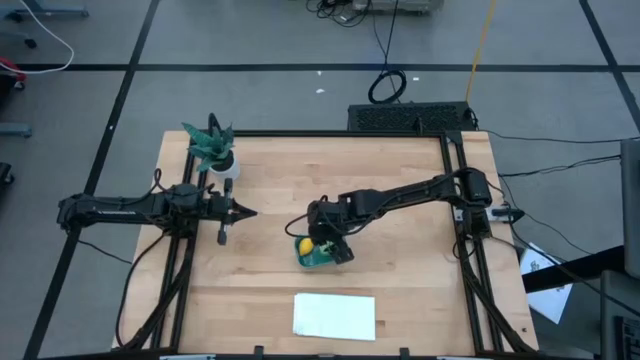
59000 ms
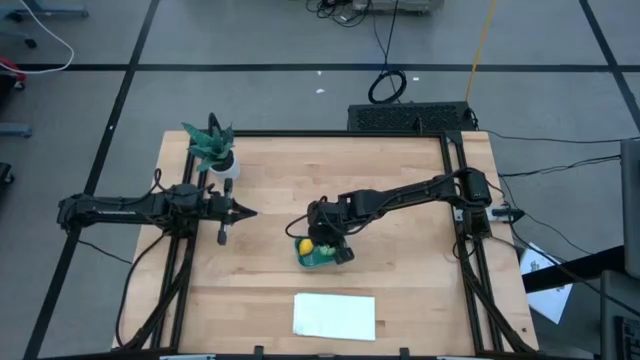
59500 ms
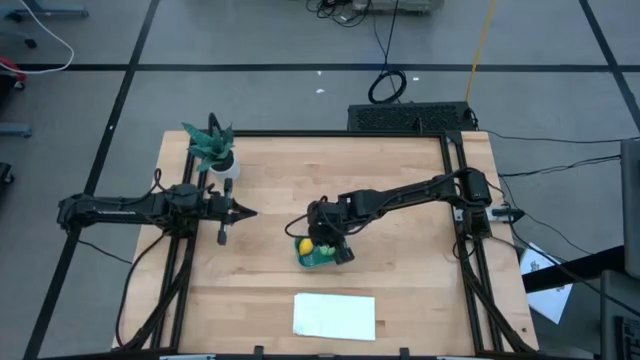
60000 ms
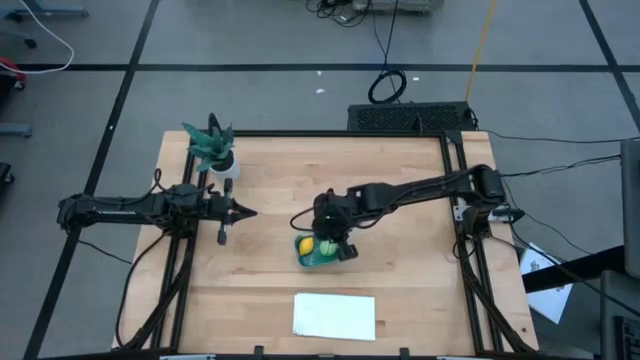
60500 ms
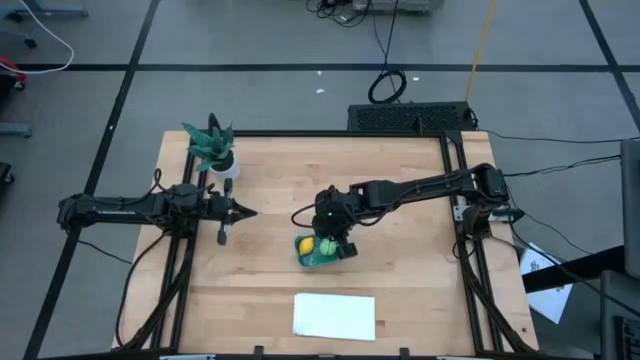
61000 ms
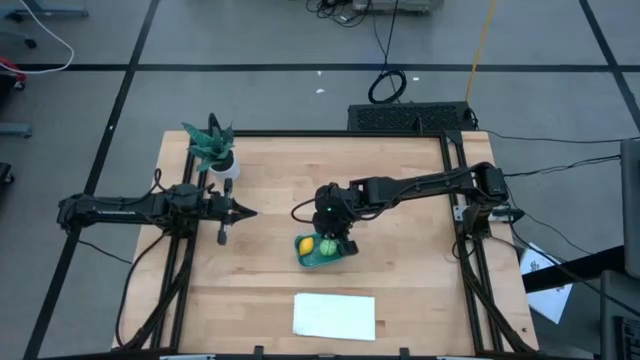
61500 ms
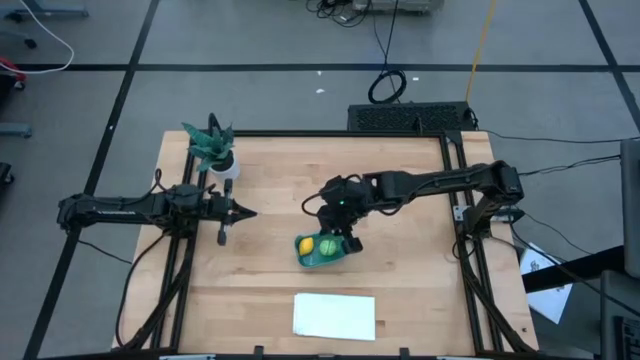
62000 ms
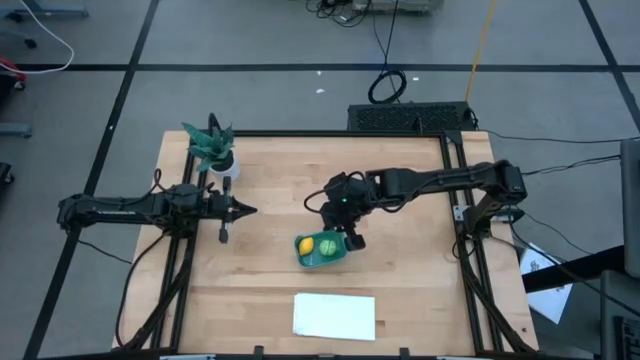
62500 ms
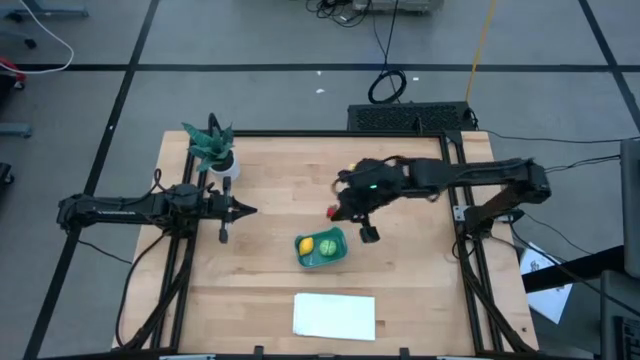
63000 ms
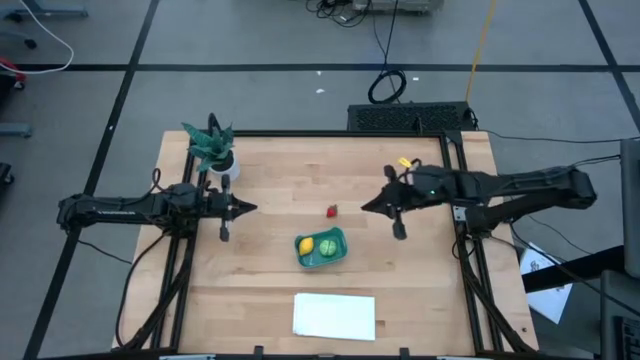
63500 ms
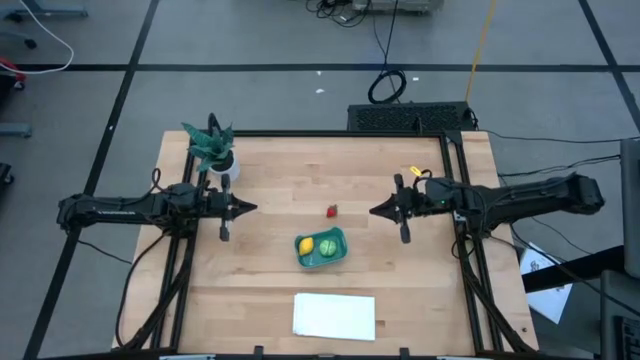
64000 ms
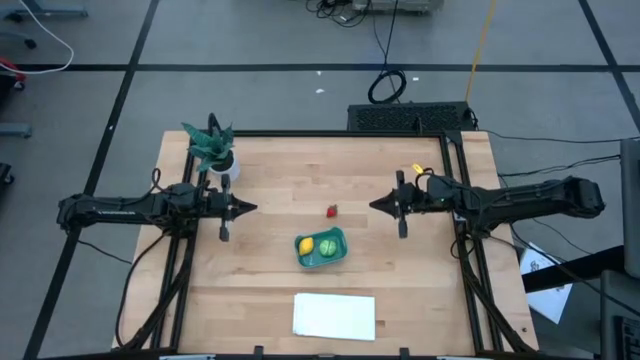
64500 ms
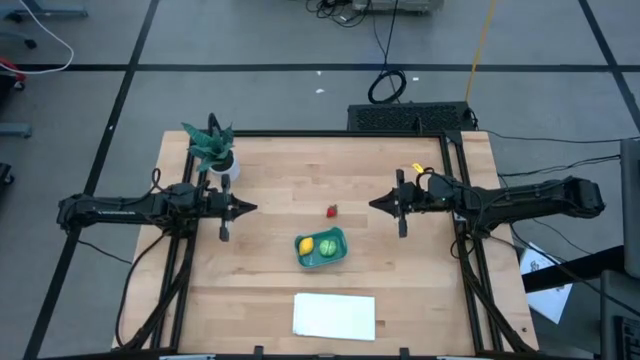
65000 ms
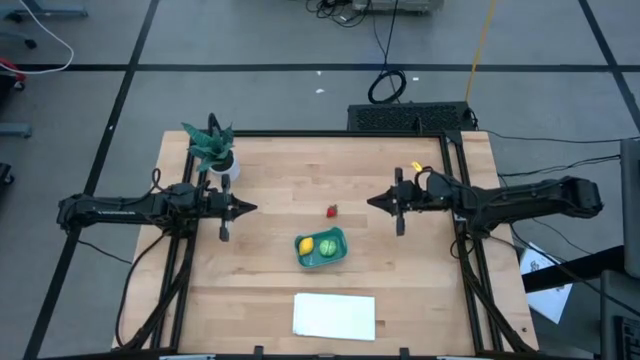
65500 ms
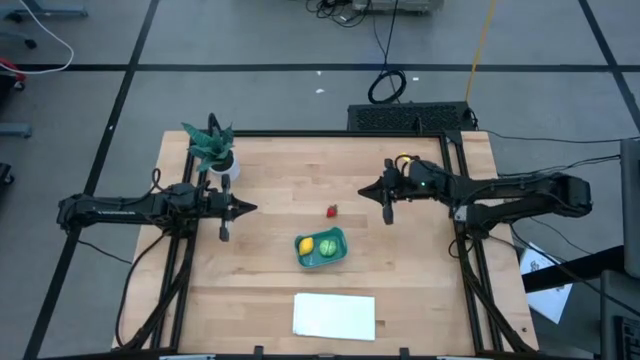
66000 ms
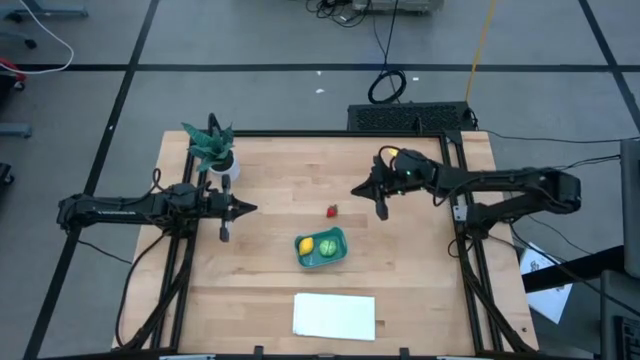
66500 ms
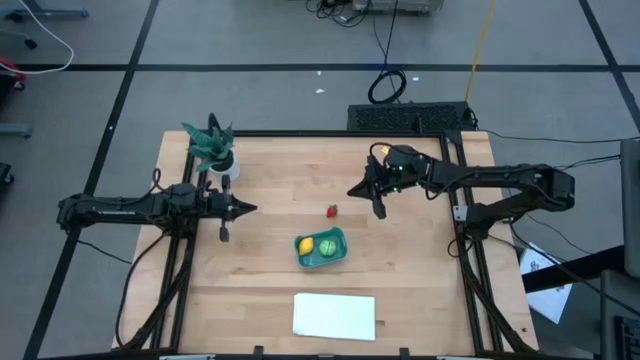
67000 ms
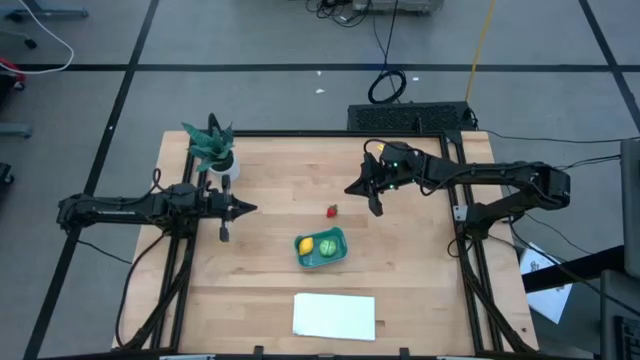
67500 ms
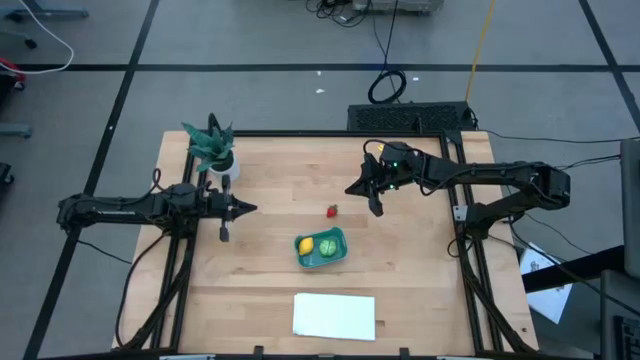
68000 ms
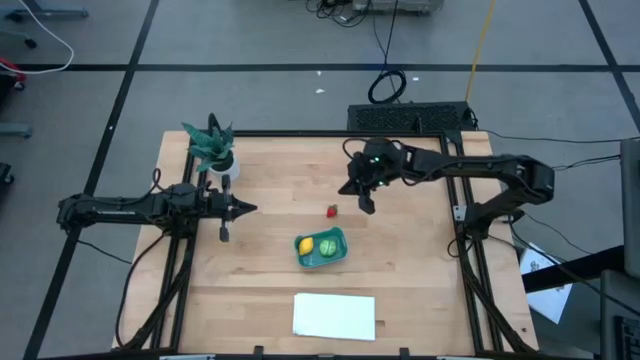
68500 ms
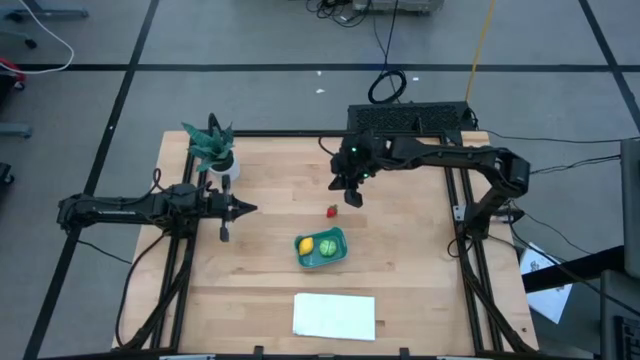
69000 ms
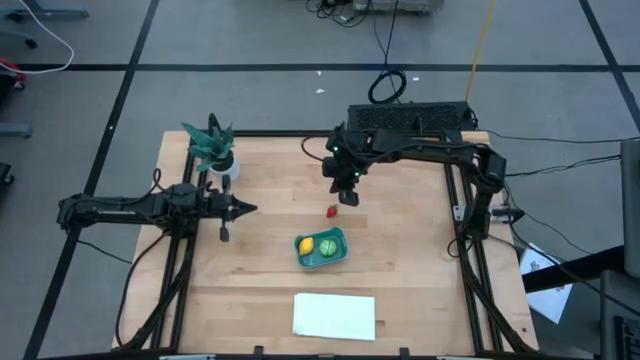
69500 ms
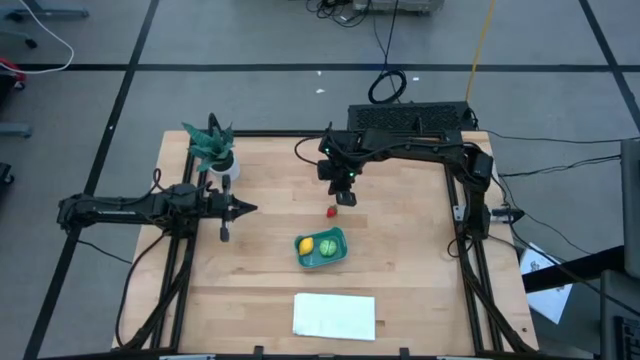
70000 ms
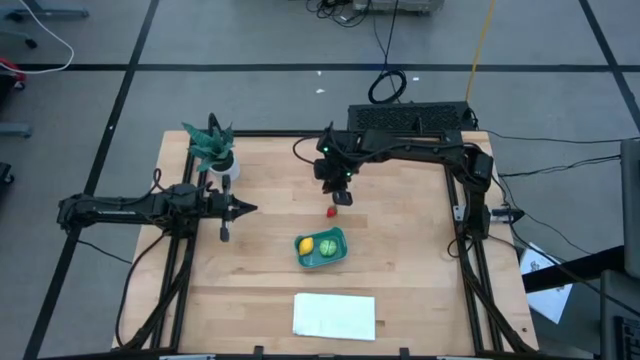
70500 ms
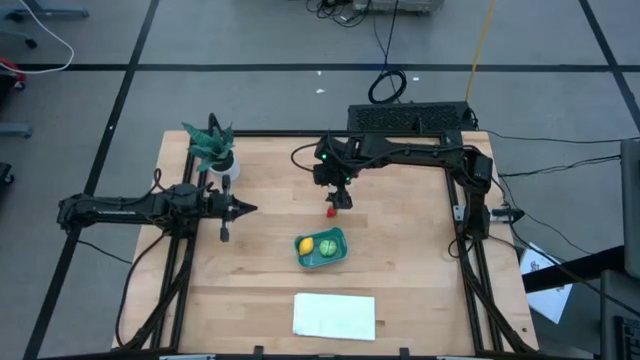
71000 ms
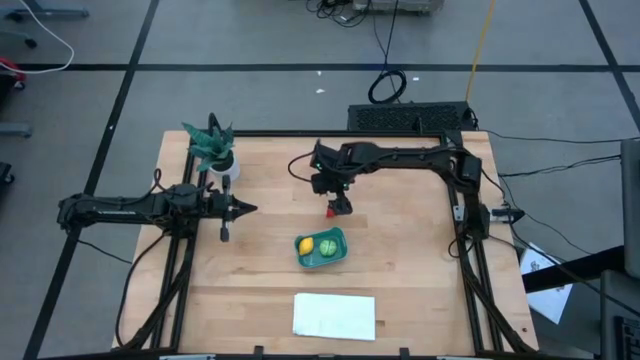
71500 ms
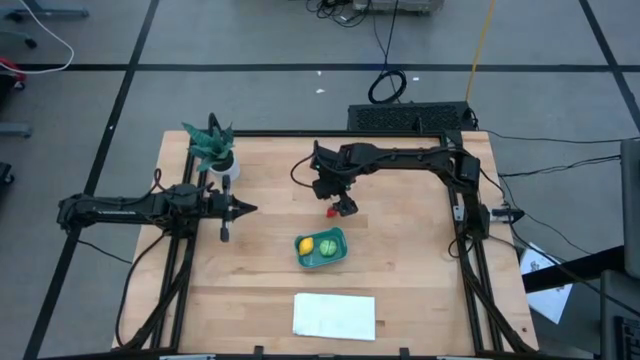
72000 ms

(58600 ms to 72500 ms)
Task: Pick and placing Produce into tupperware
Put the red strawberry into the blue bin

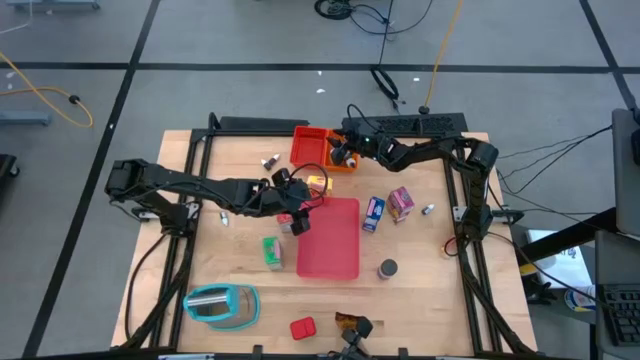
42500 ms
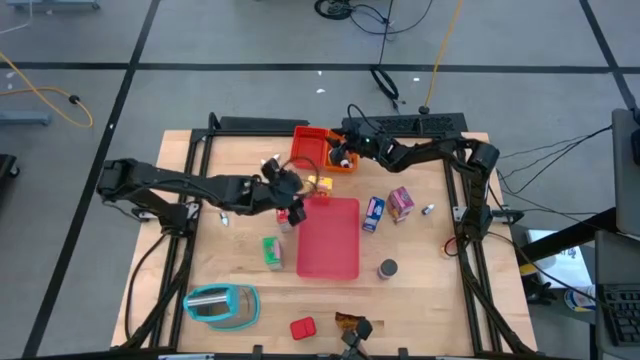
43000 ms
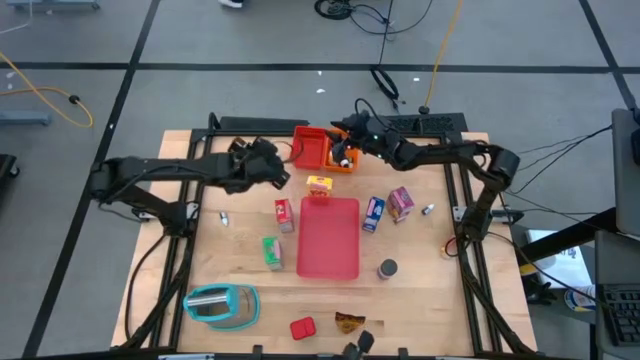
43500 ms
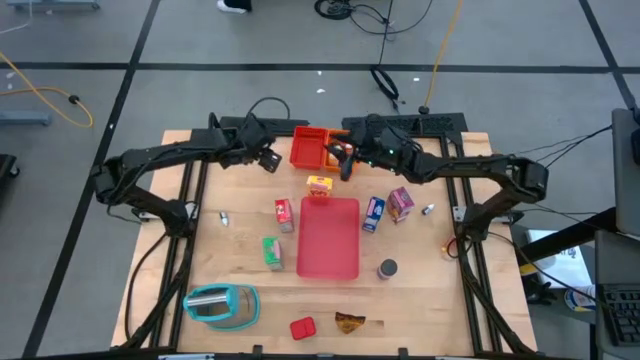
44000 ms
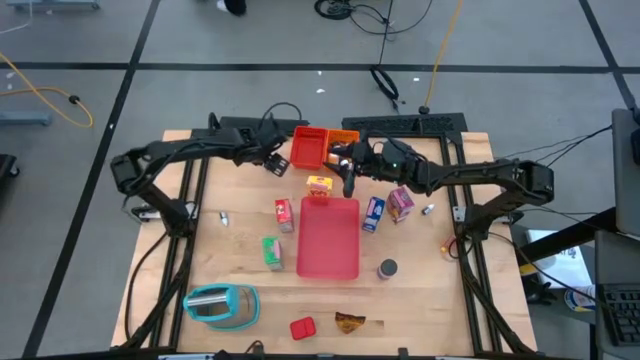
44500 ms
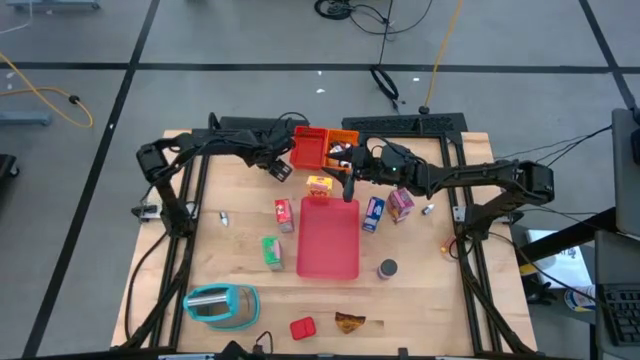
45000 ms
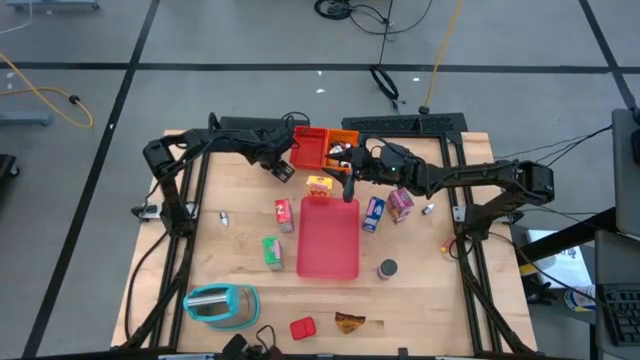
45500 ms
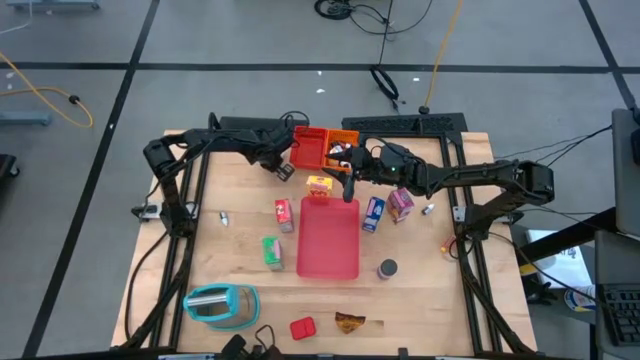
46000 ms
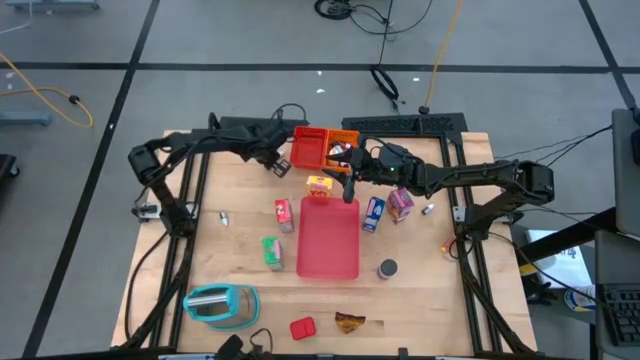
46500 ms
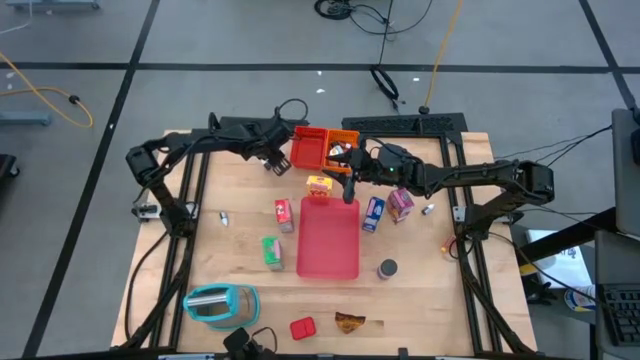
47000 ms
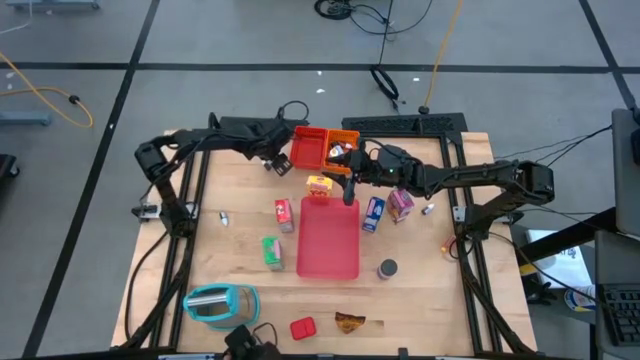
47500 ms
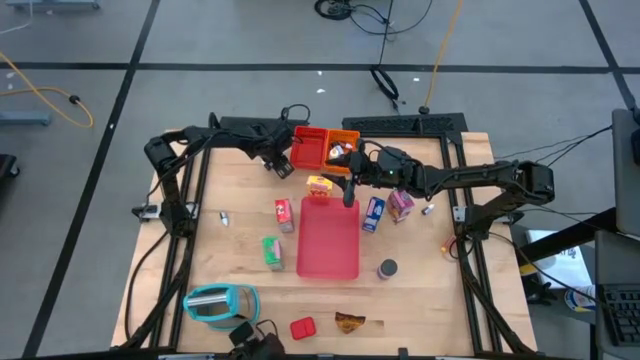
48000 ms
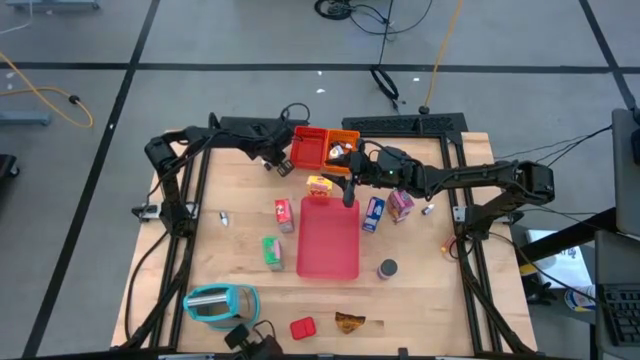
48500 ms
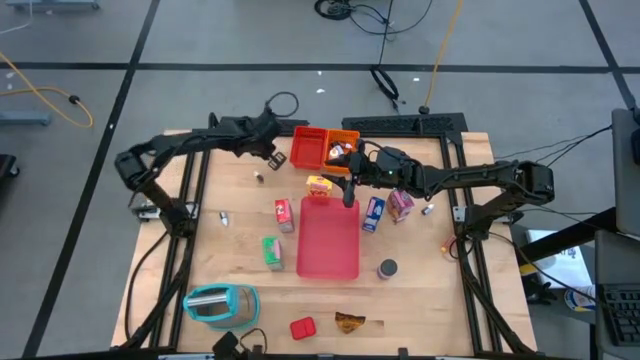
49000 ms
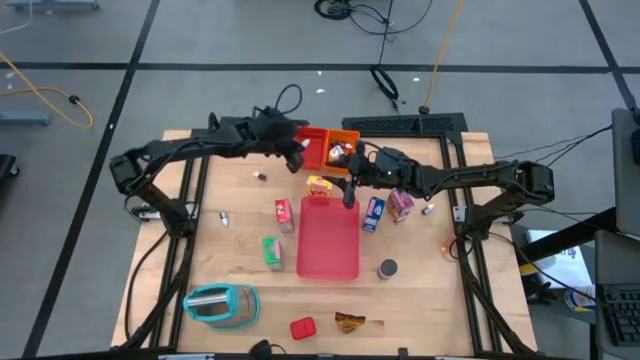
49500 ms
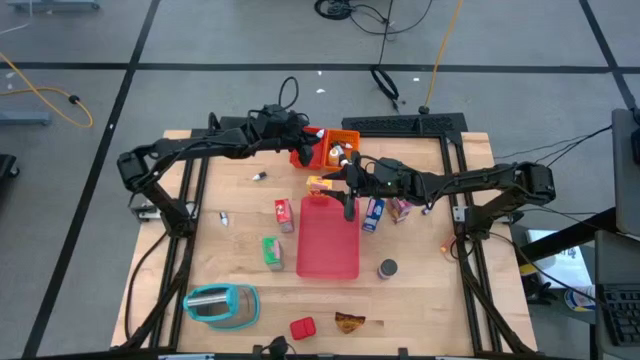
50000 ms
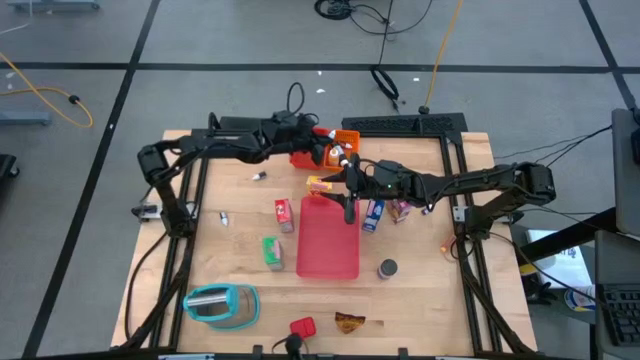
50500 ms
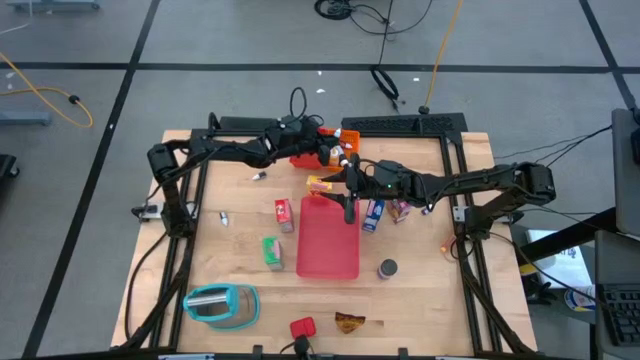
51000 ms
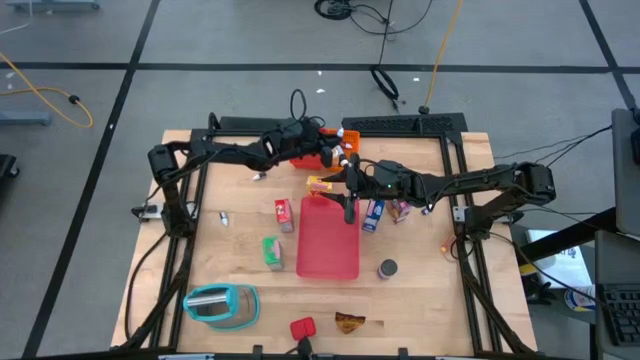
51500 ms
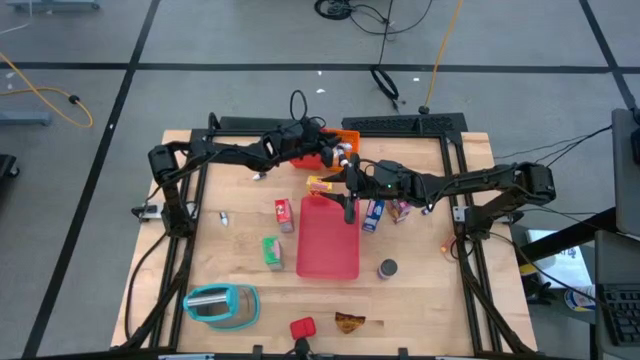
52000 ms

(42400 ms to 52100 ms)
Task: Pick & Place Kitchen Items
Put the top right small black food coloring bottle into the orange basket
